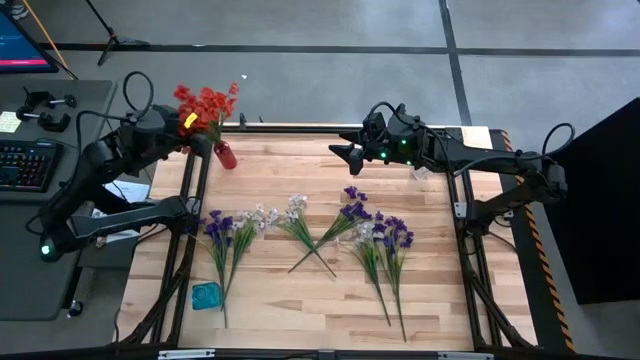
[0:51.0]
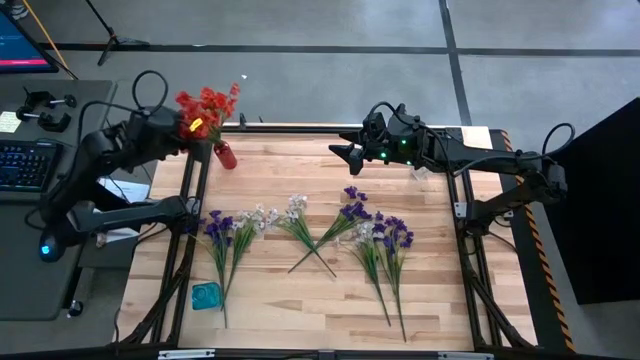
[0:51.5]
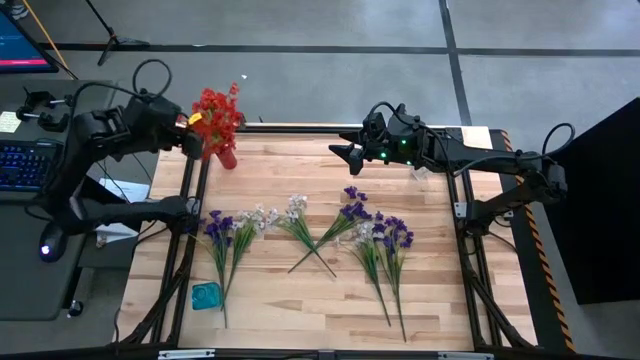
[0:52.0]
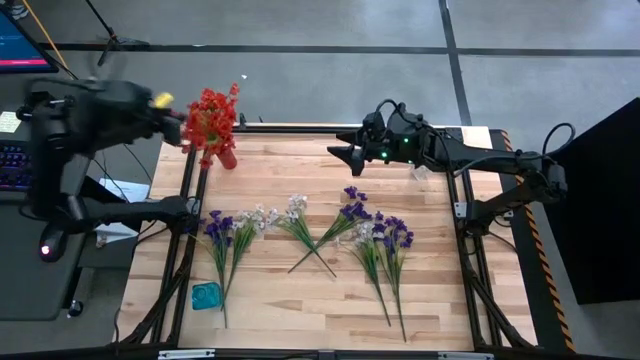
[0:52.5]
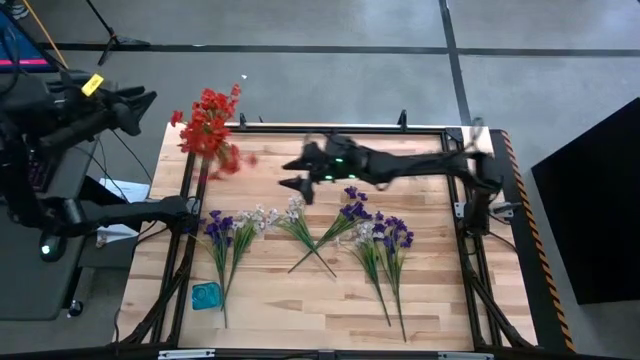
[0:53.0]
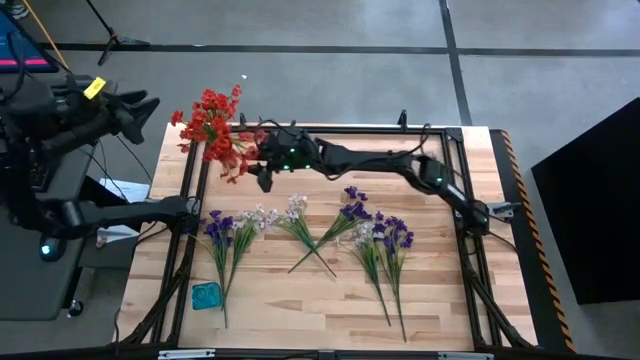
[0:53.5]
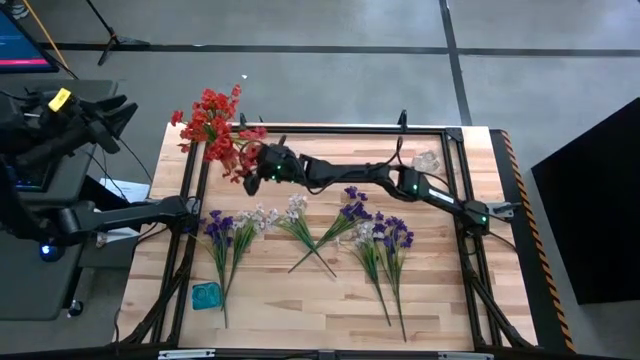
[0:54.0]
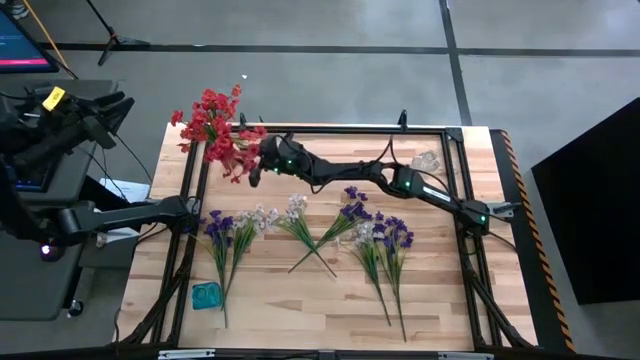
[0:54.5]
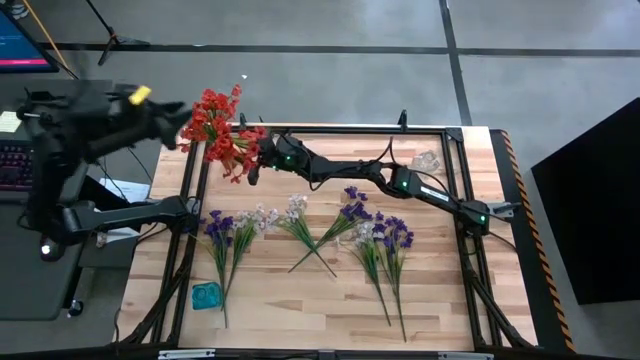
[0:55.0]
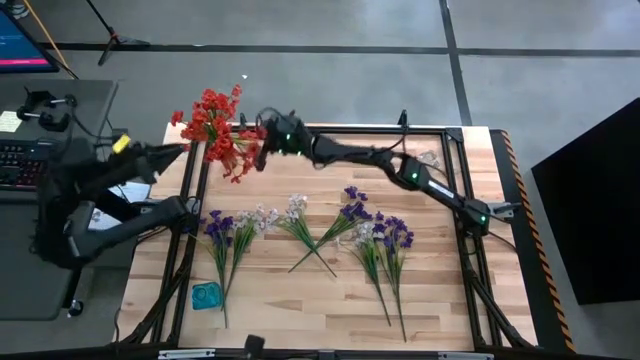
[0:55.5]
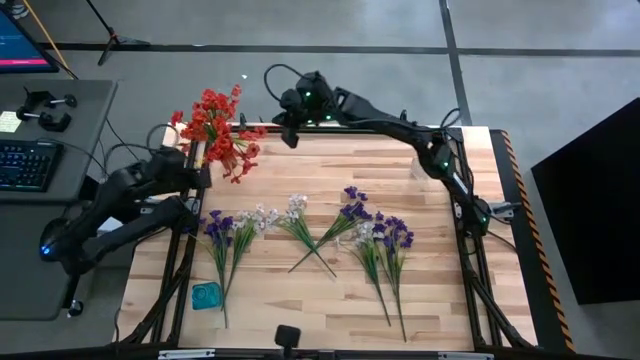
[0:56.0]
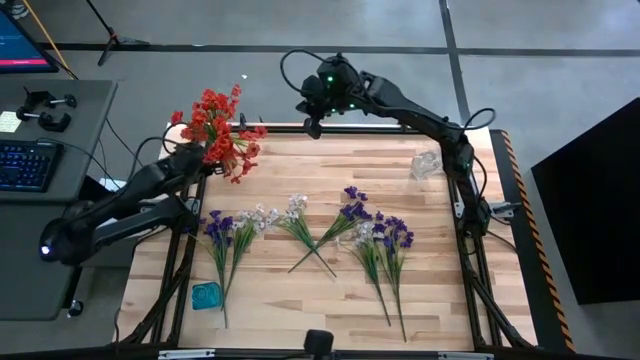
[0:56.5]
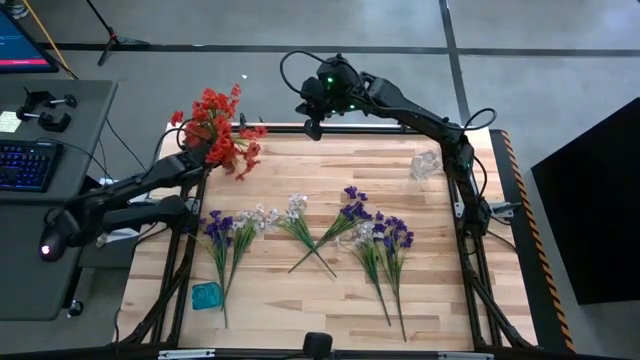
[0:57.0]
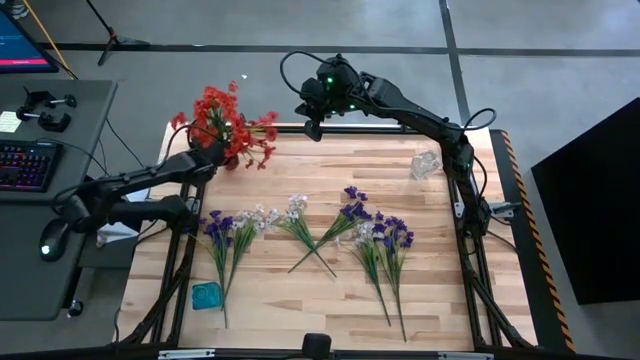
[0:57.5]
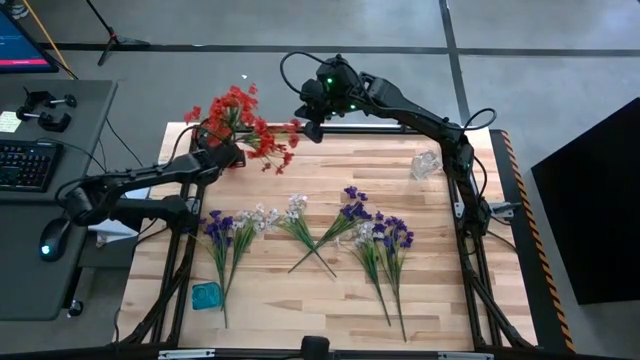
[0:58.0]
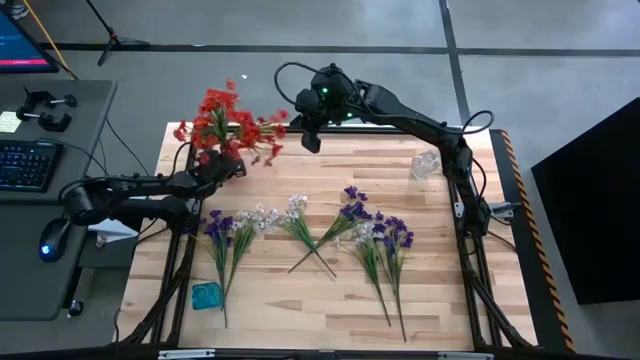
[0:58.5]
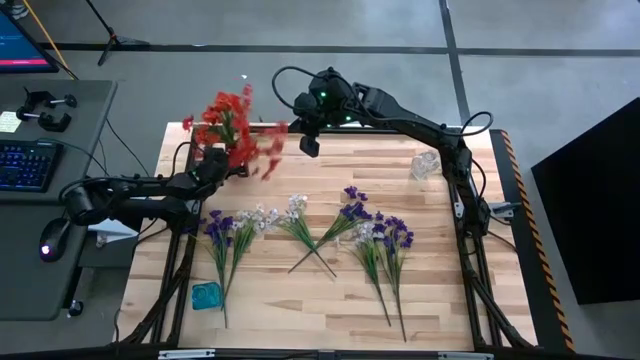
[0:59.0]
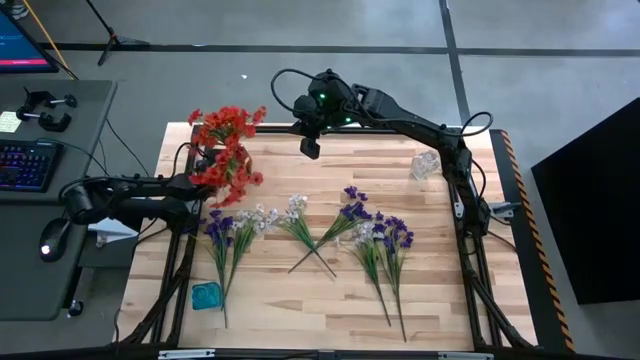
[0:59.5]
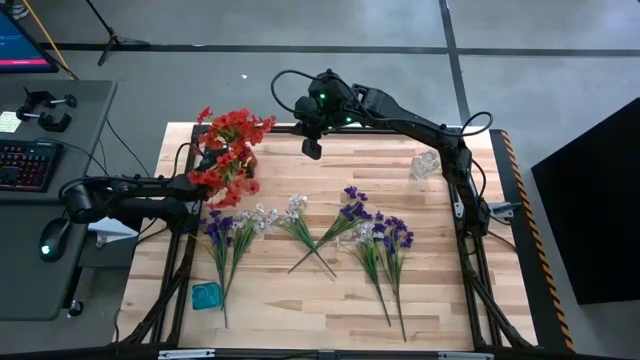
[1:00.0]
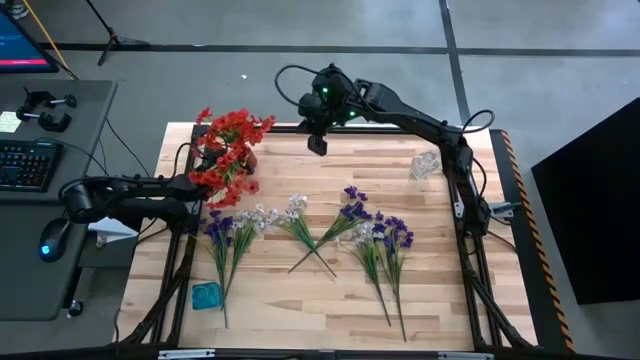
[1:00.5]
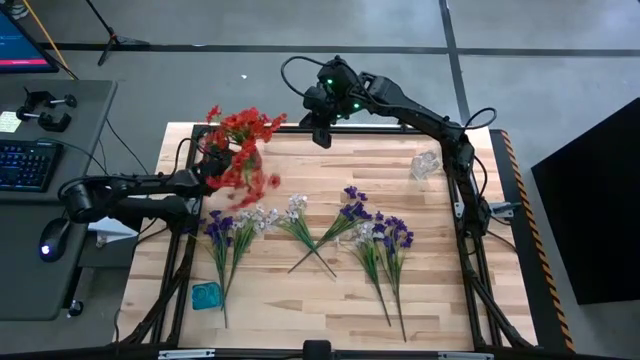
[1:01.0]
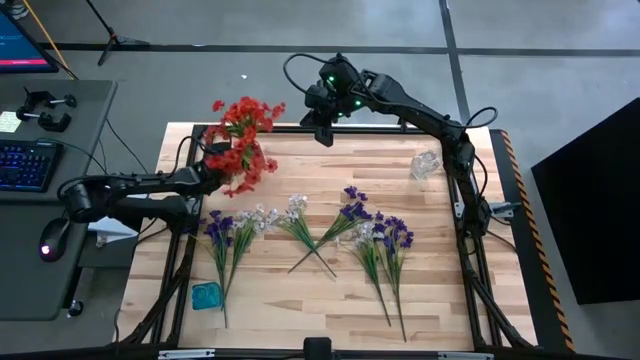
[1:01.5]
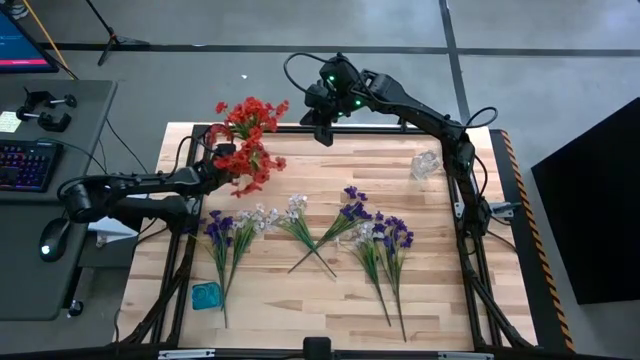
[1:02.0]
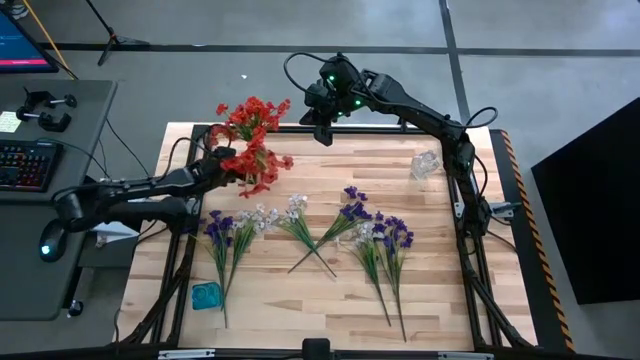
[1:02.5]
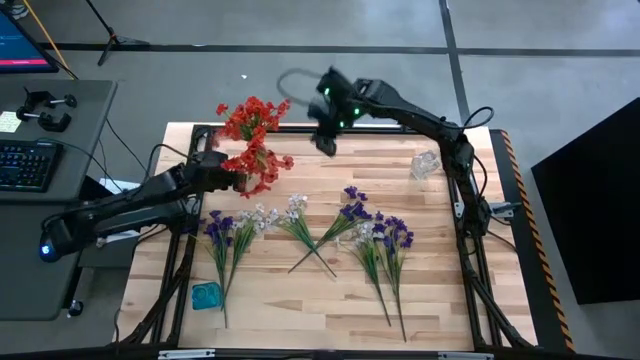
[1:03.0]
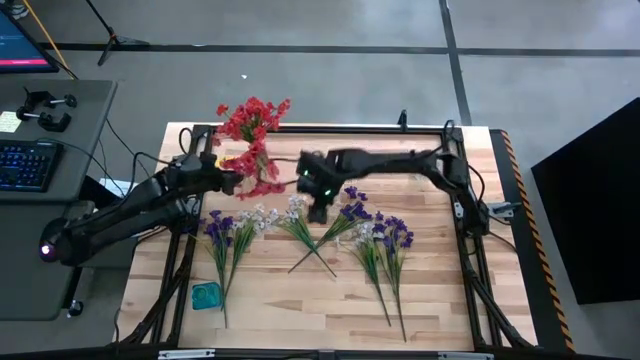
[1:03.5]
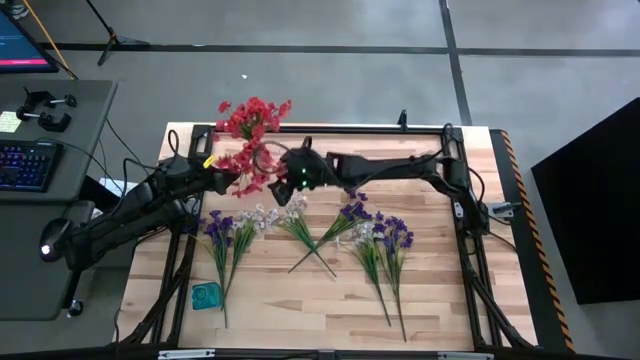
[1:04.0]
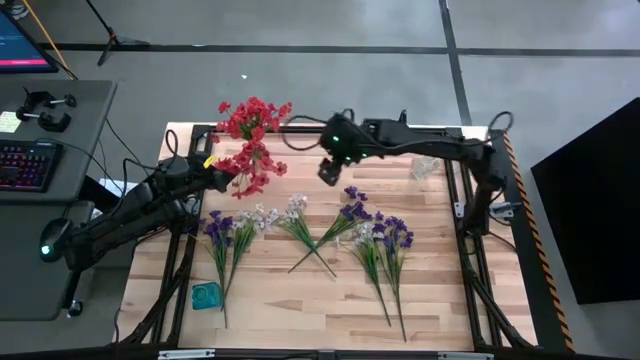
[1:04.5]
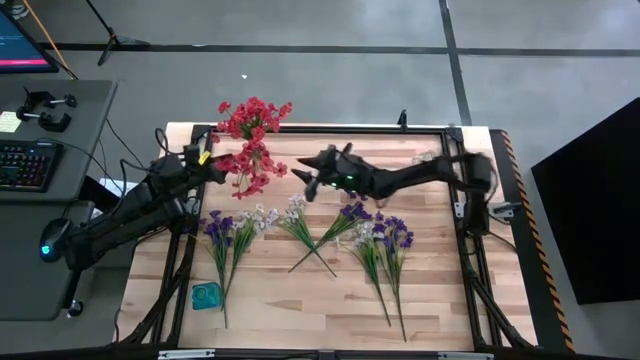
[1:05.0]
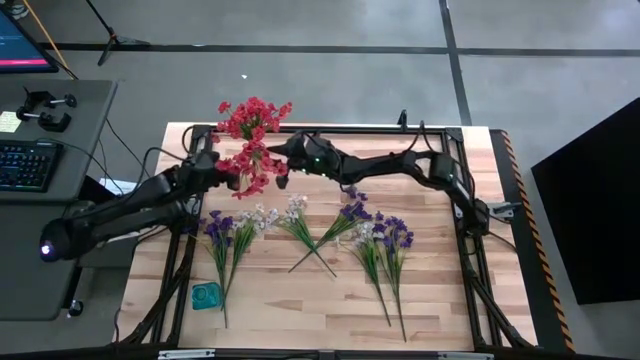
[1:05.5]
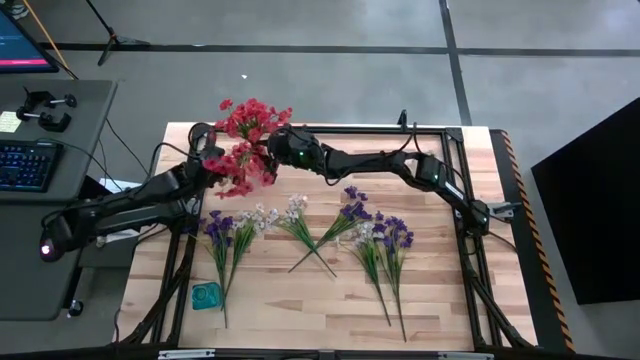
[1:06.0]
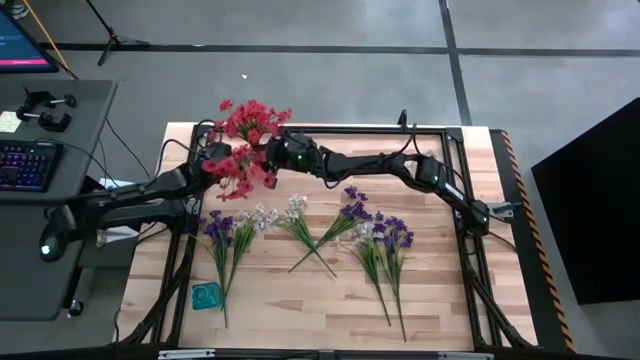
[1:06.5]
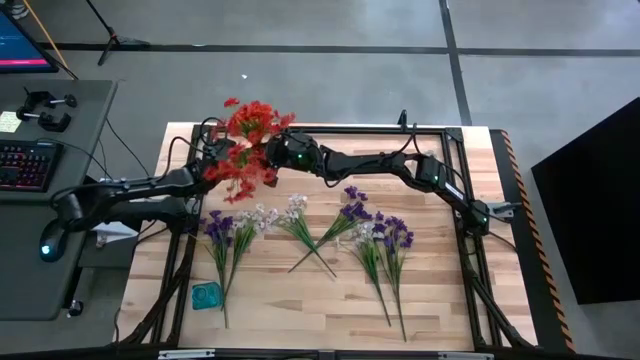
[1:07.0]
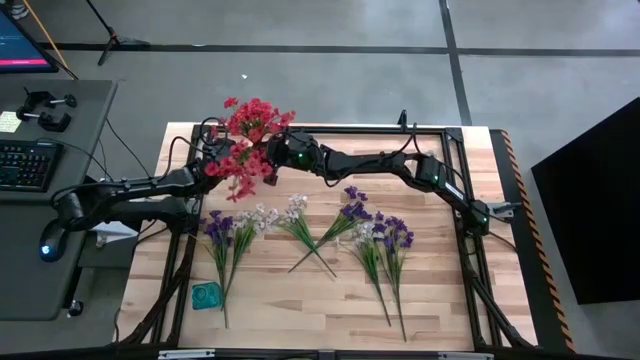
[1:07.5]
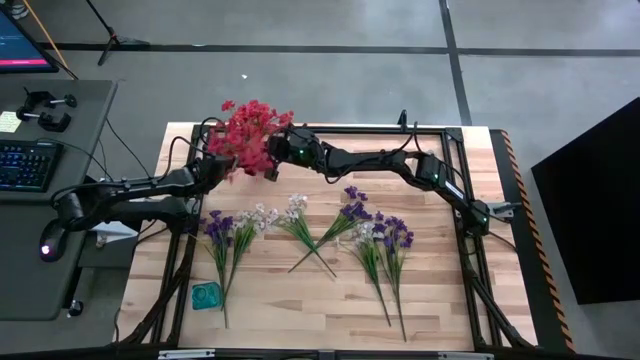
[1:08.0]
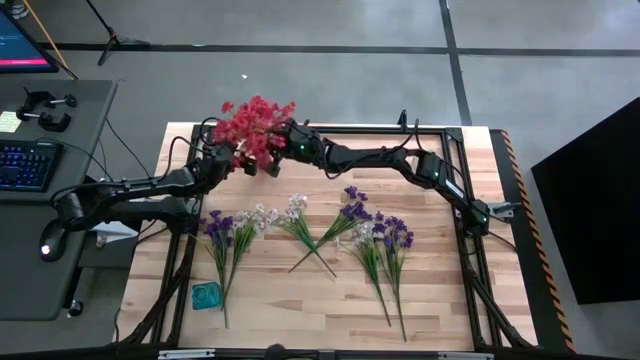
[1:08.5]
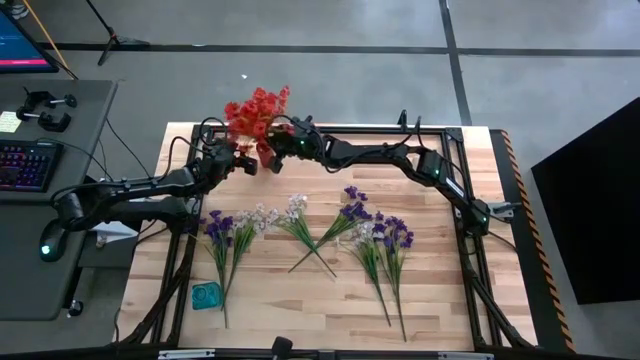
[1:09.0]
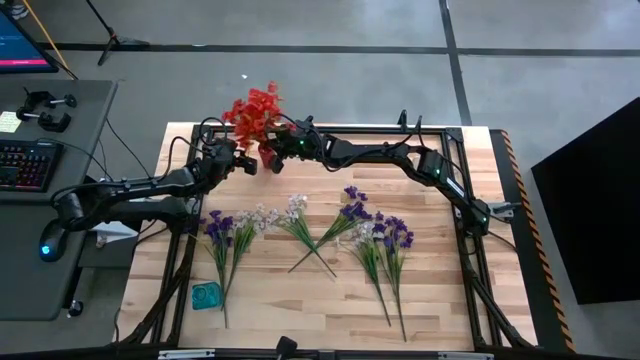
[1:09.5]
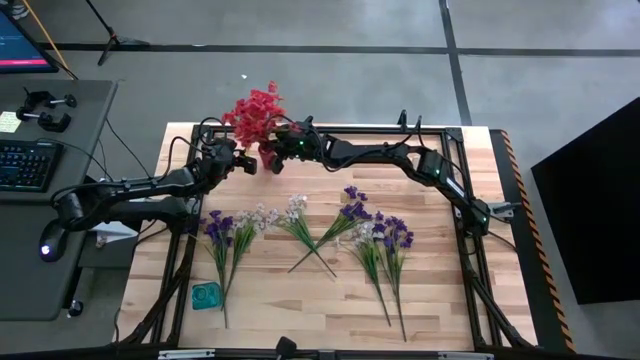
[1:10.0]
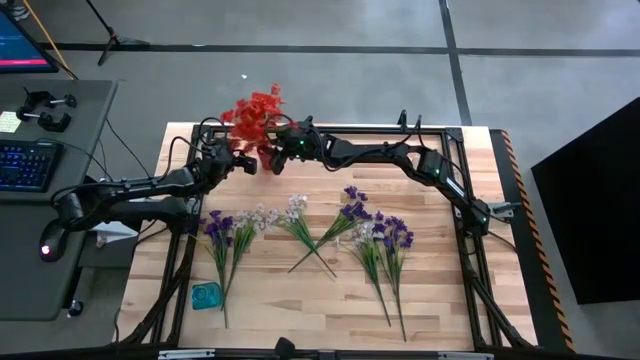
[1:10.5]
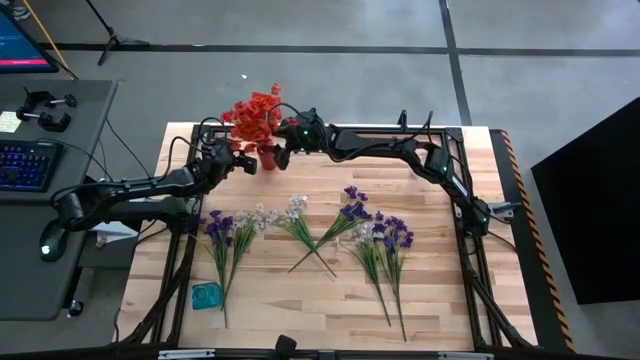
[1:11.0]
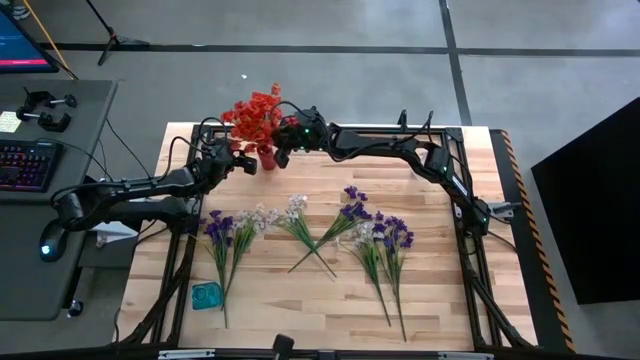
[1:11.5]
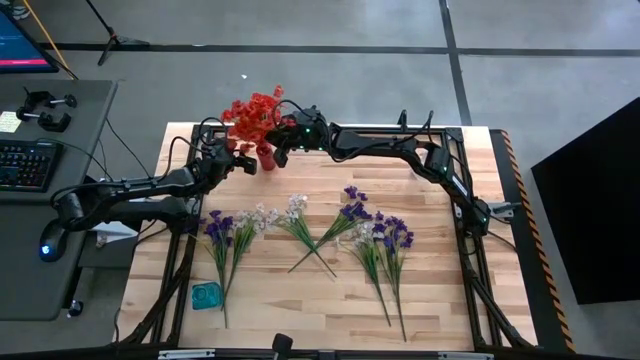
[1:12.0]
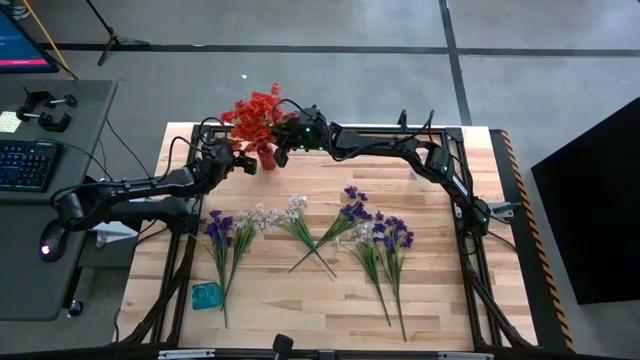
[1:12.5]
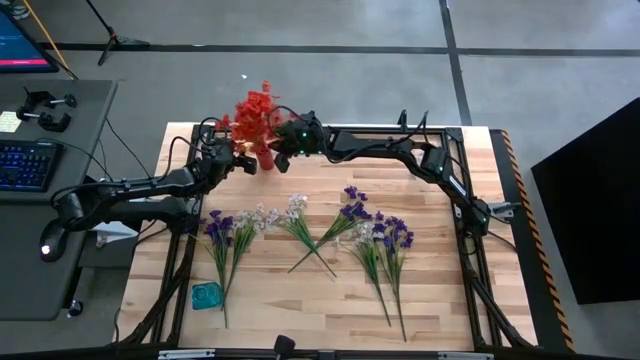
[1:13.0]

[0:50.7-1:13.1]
Task: Sort flowers into vase by color
Put the red flowers into the red vase
